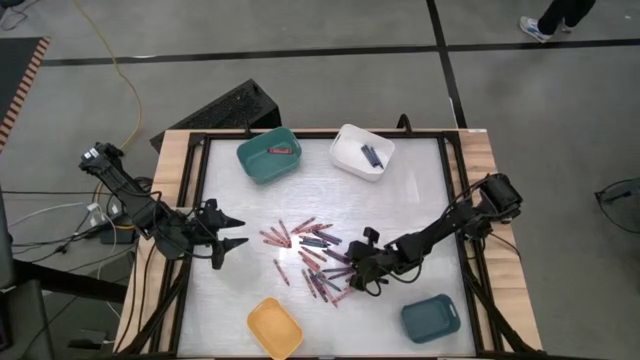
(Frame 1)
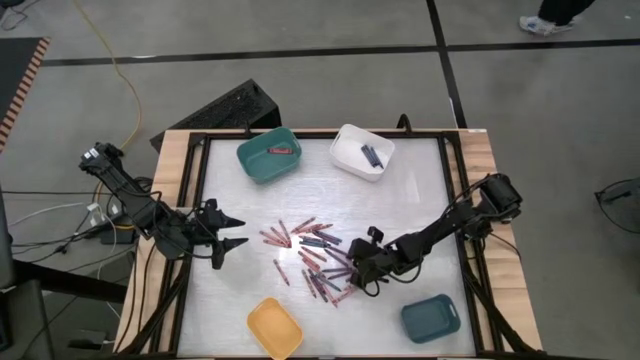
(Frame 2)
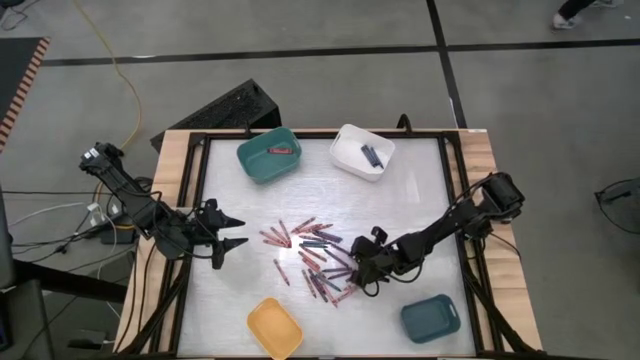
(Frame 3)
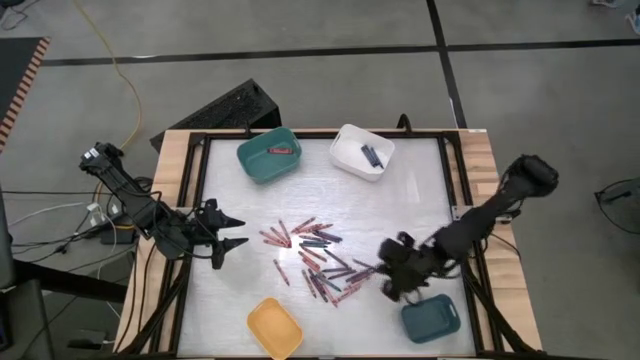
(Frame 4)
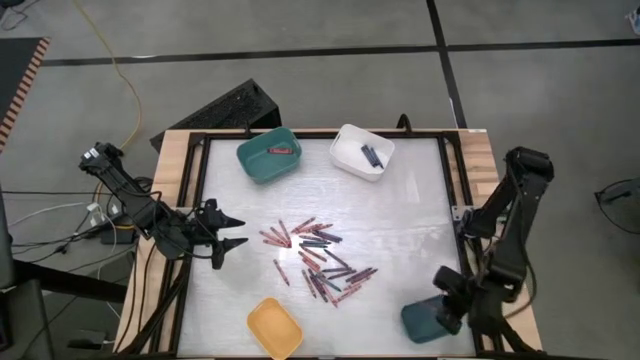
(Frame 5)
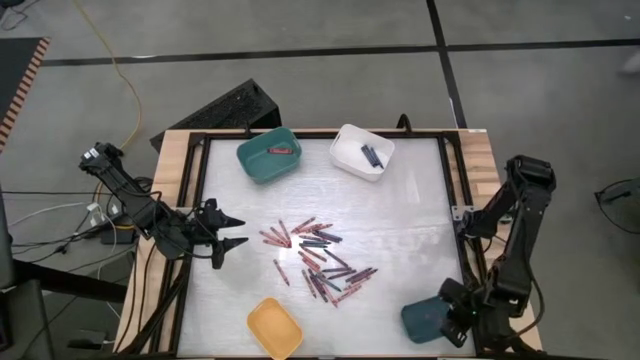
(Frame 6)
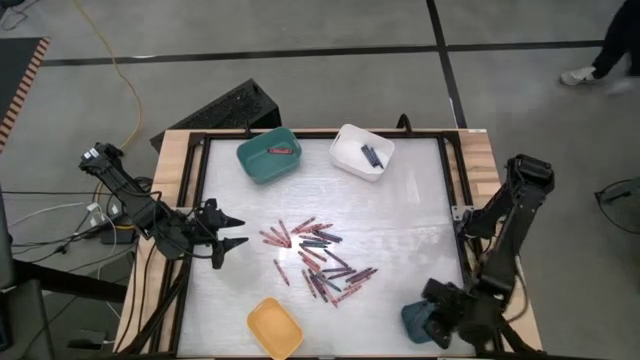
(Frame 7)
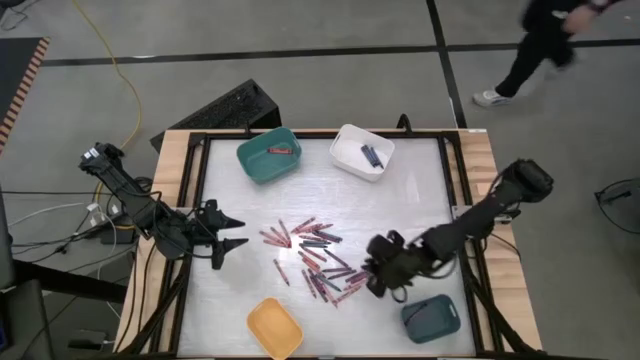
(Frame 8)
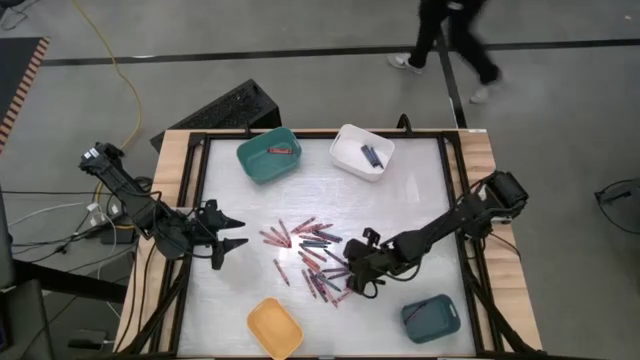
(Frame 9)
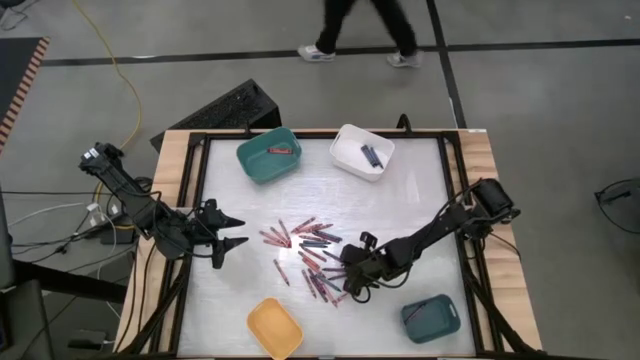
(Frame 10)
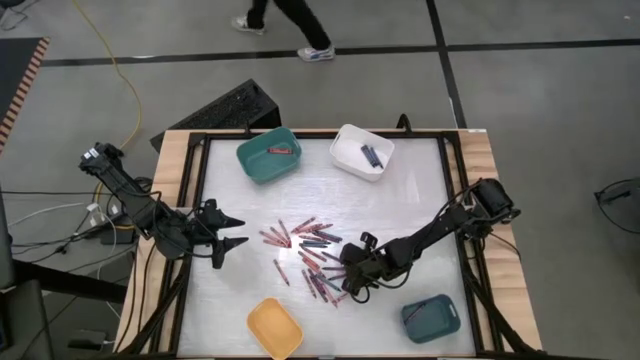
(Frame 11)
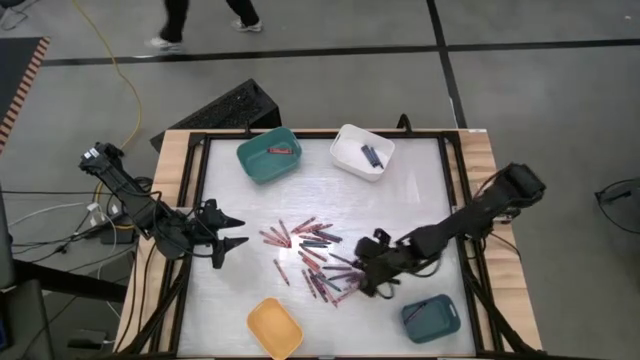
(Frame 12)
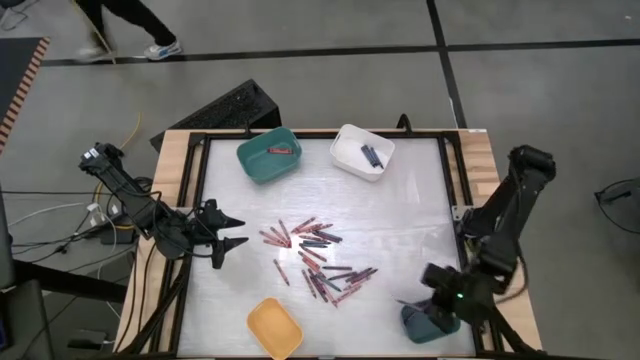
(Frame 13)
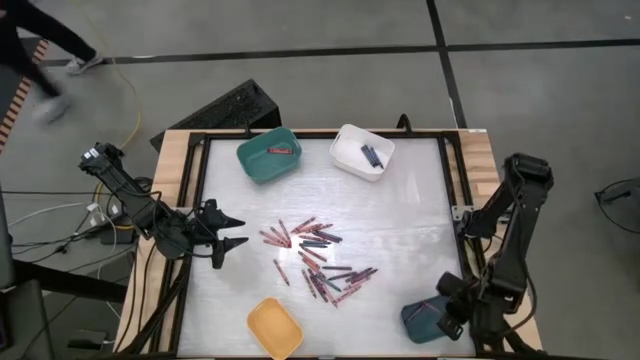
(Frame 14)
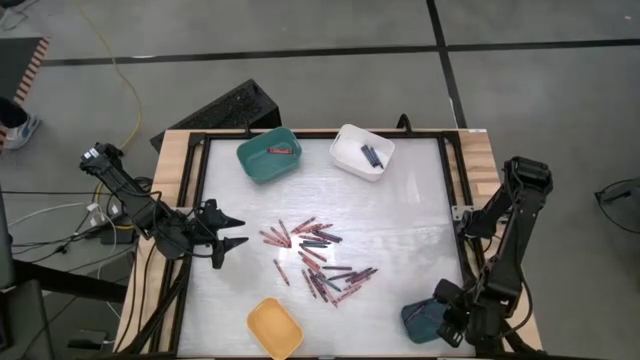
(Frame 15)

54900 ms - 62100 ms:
Task: Sort crayons
Put the purple crayon into the blue bin

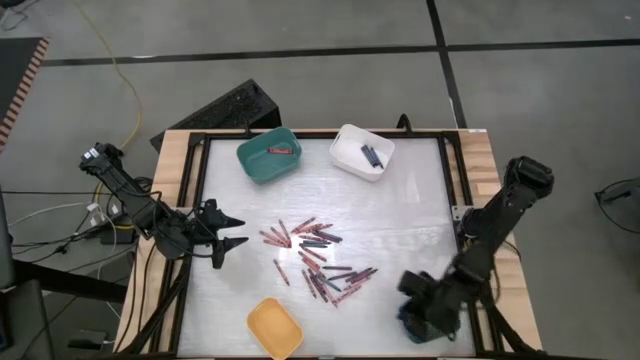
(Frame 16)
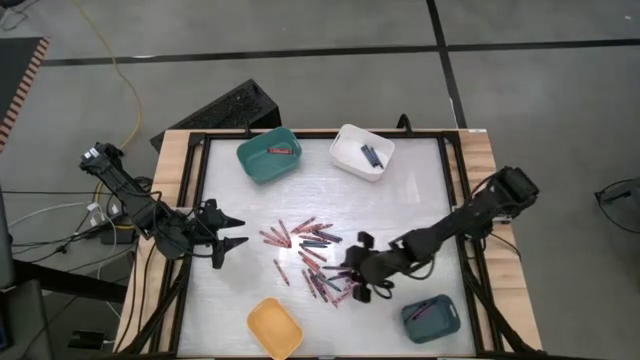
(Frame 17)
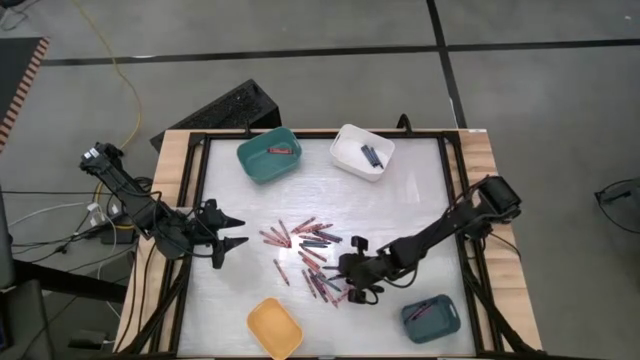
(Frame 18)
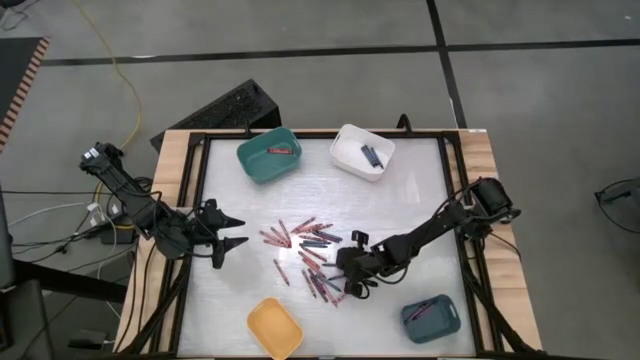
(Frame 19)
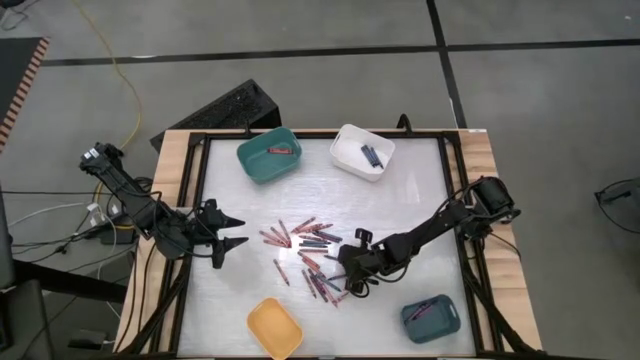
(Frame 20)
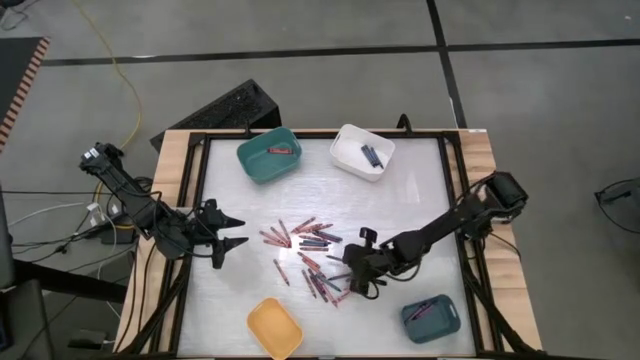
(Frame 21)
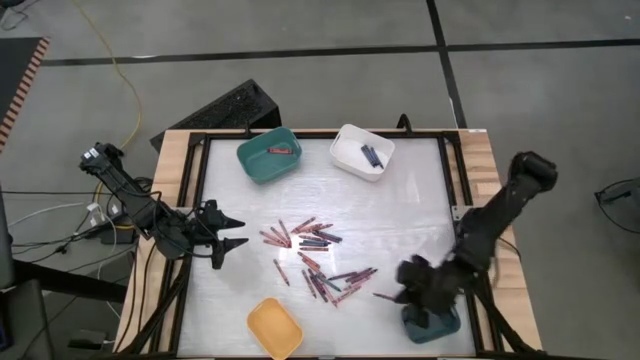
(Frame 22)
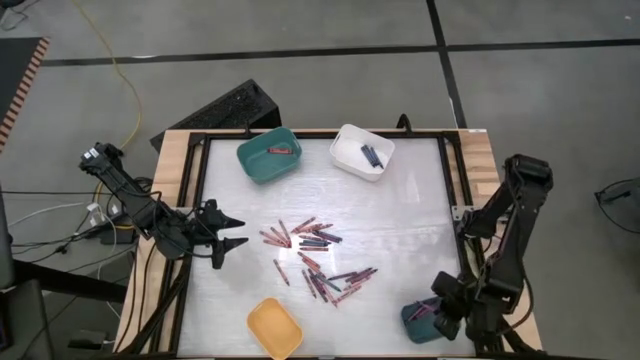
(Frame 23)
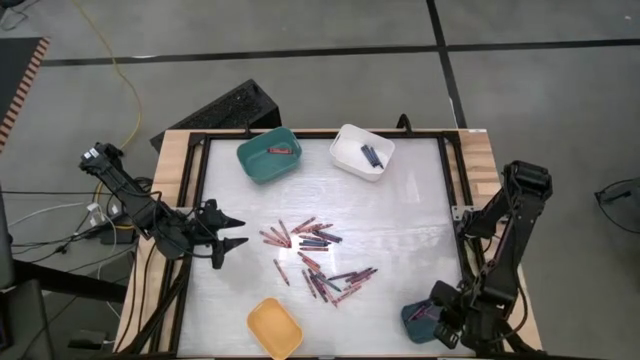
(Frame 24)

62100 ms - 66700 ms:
Put the purple crayon into the blue bin

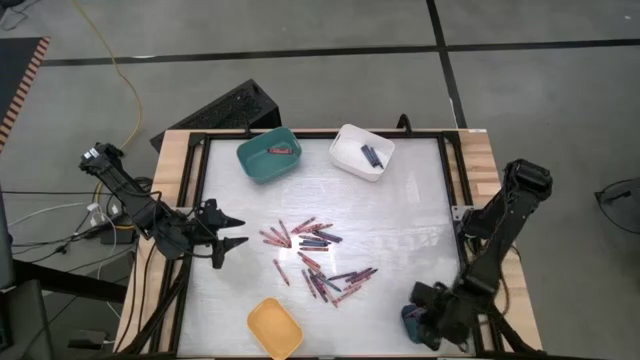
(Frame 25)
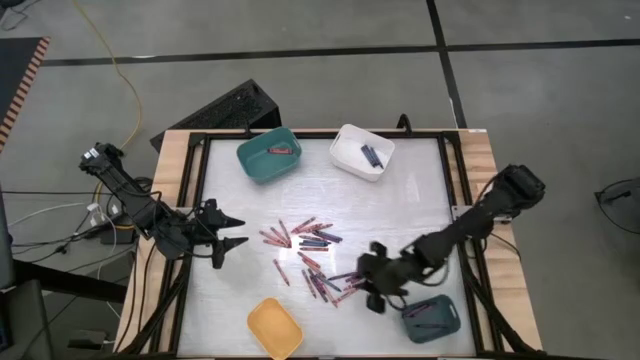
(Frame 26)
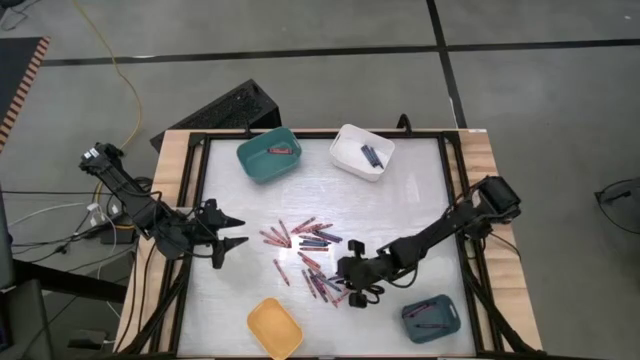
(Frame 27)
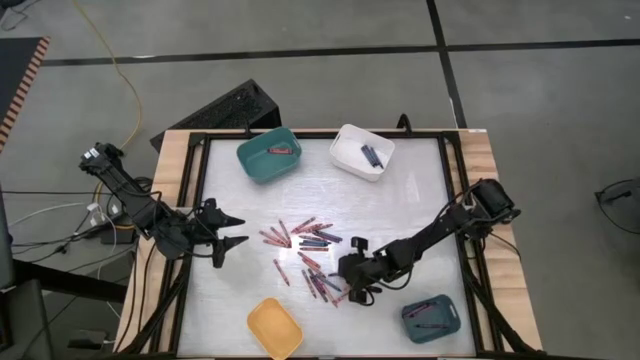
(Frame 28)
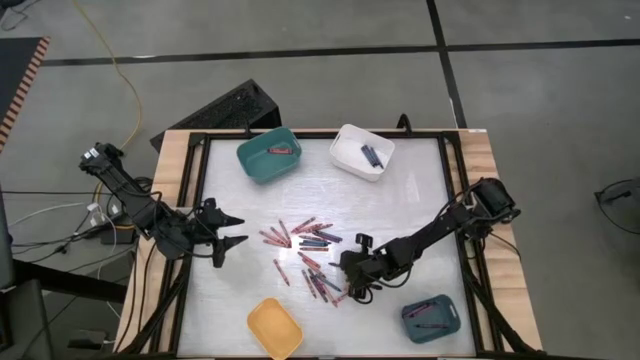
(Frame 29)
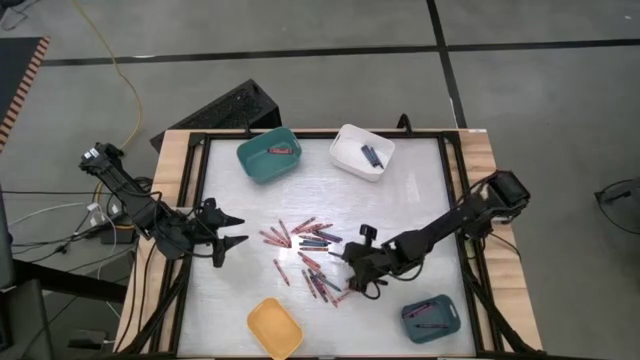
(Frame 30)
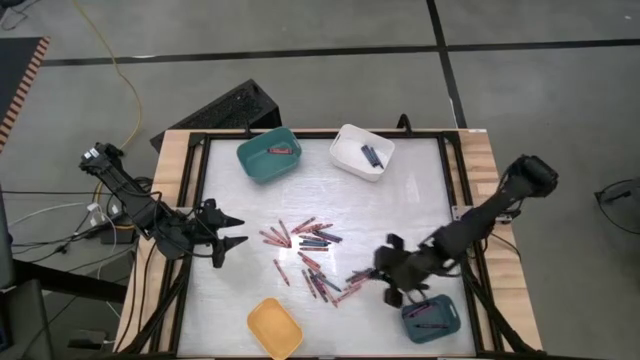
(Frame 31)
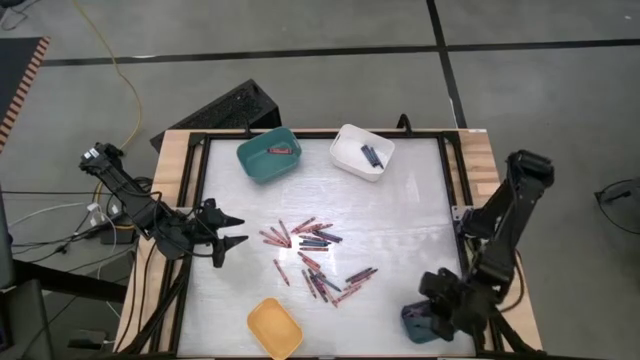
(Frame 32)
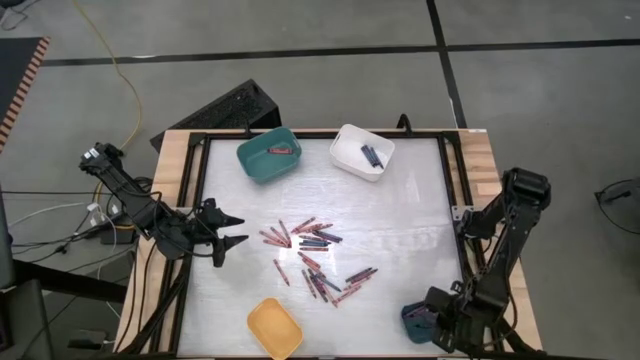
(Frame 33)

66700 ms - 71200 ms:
Put the purple crayon into the blue bin

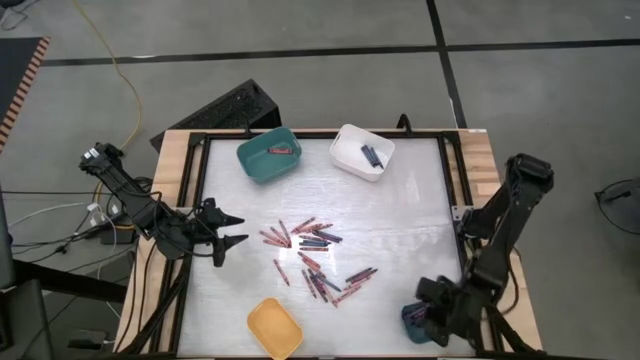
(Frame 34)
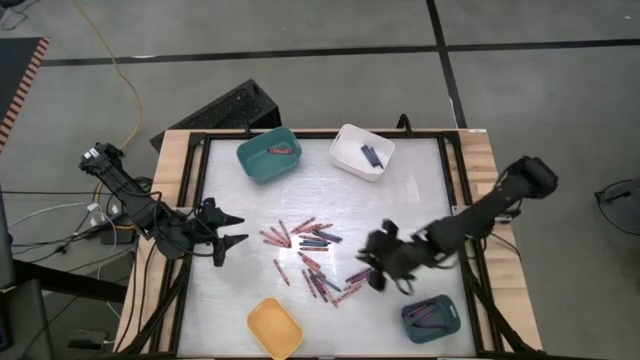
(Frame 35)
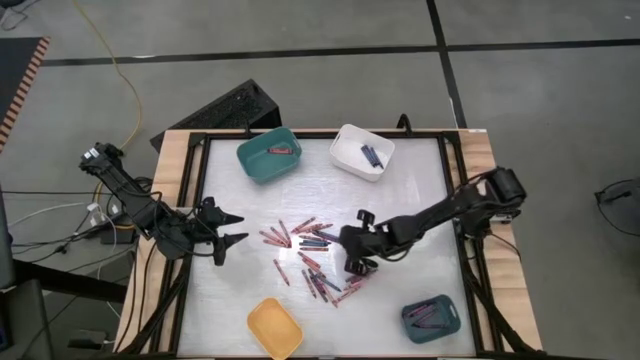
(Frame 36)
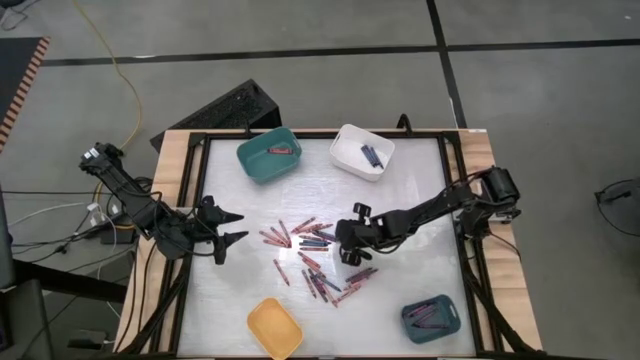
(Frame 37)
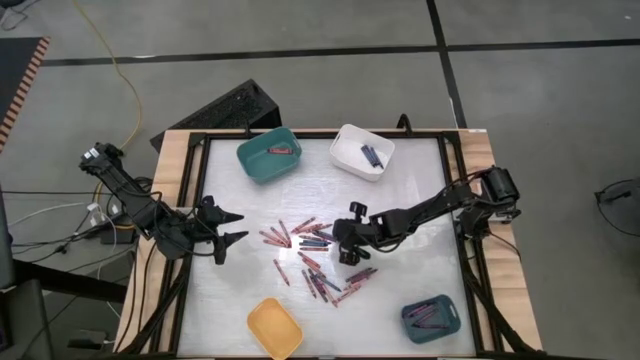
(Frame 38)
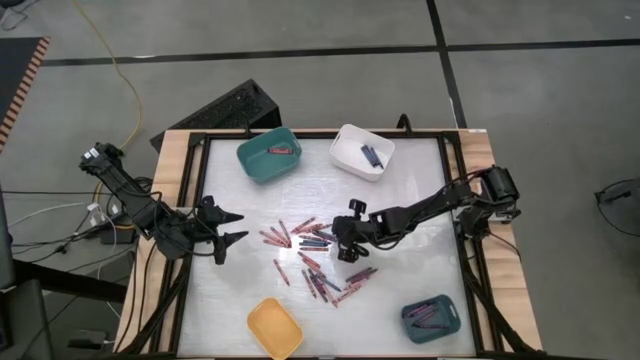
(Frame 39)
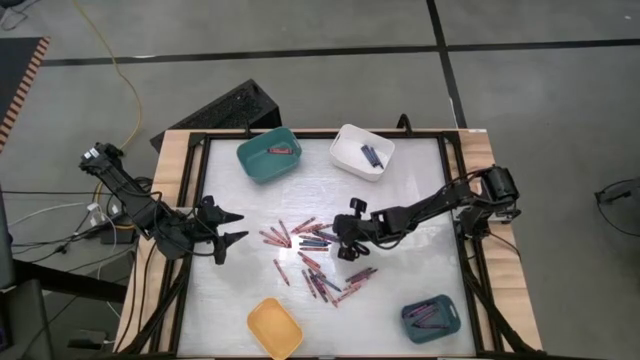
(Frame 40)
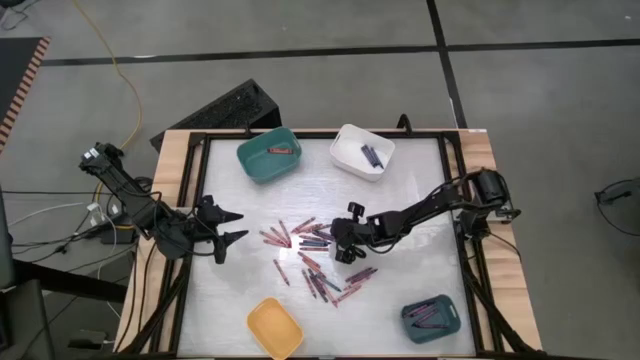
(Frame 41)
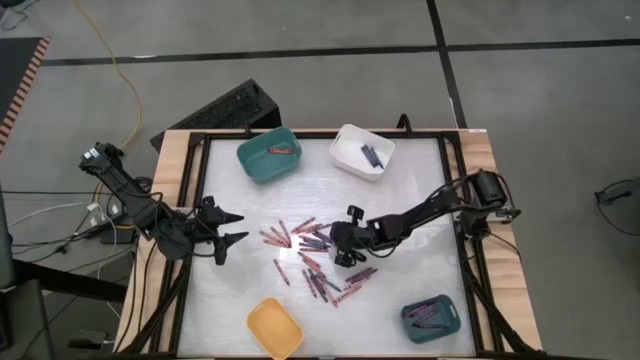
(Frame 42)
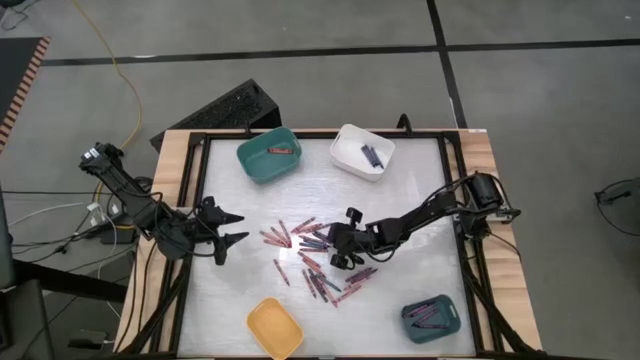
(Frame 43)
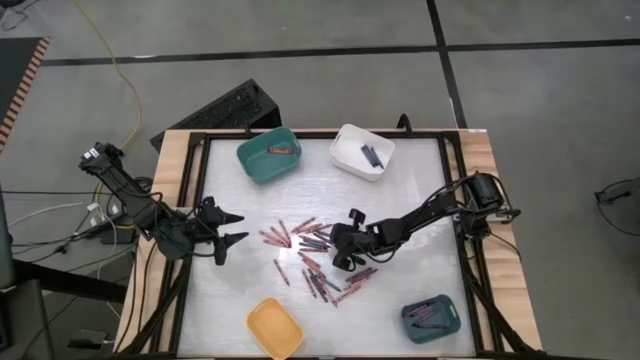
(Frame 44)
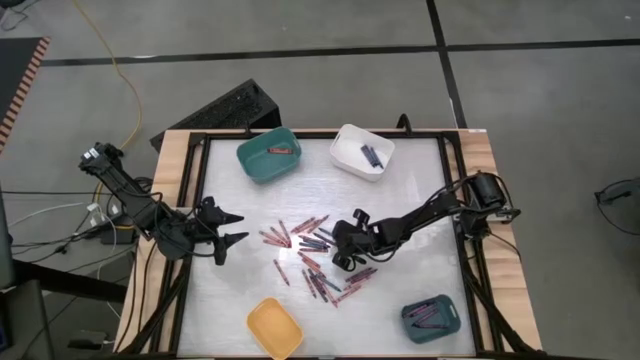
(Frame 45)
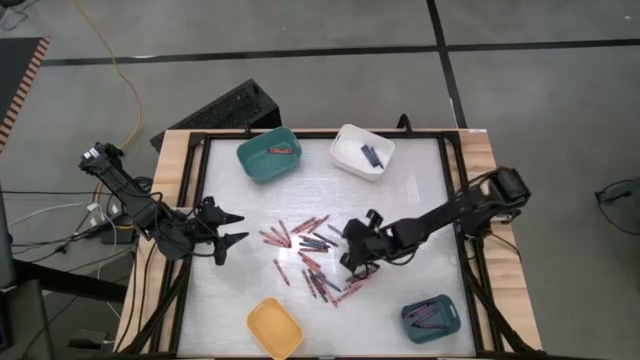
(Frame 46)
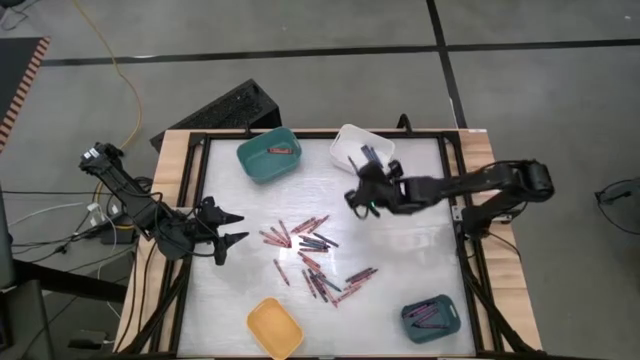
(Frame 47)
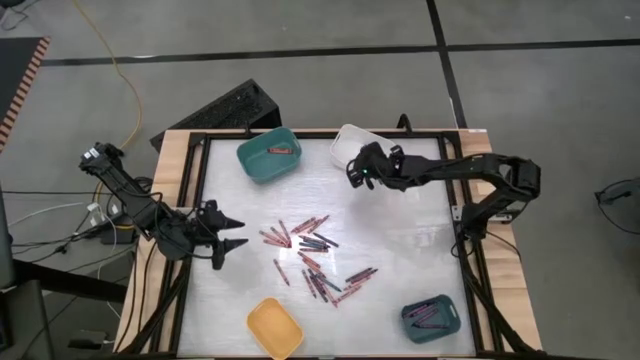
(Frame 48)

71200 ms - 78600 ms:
Put the blue crayon into the white bin
